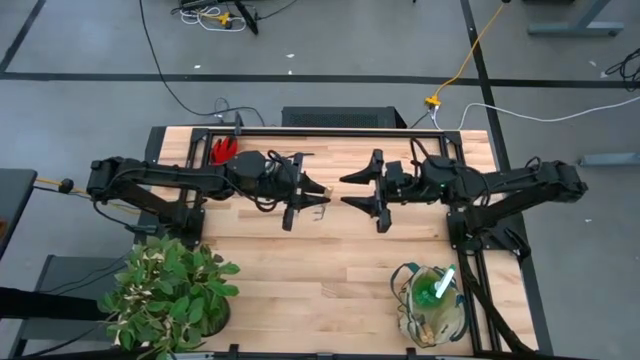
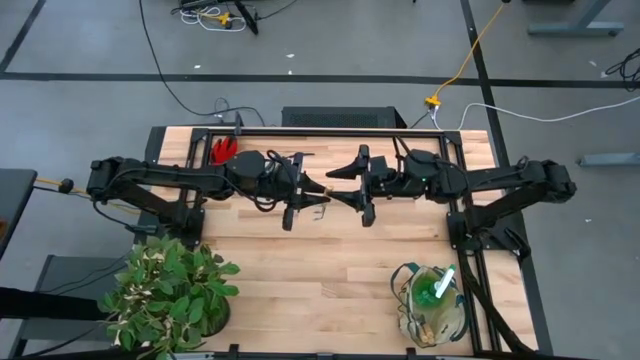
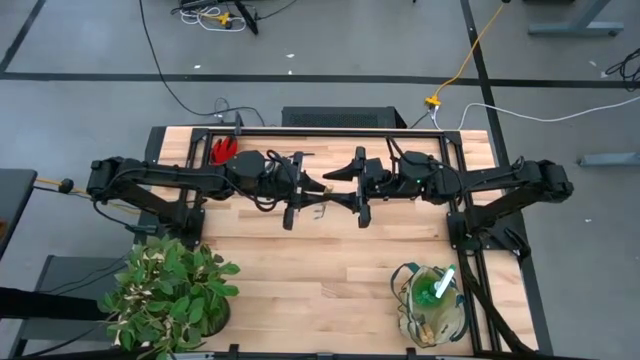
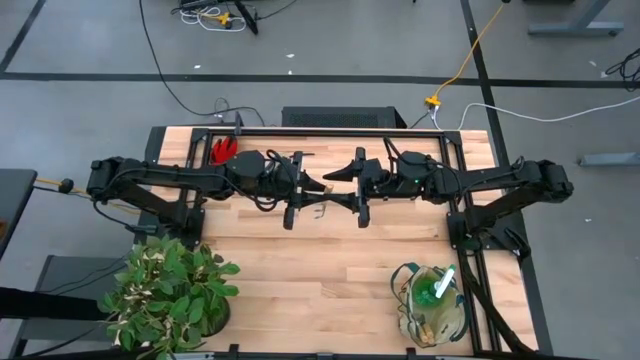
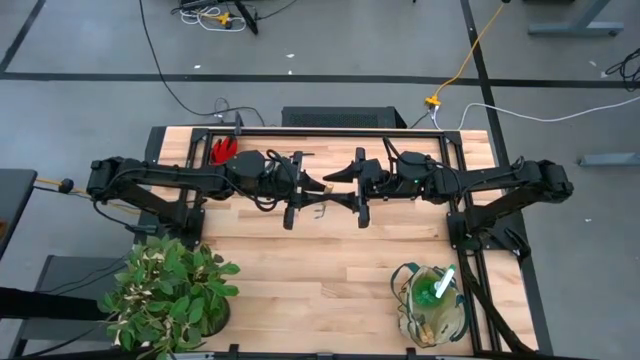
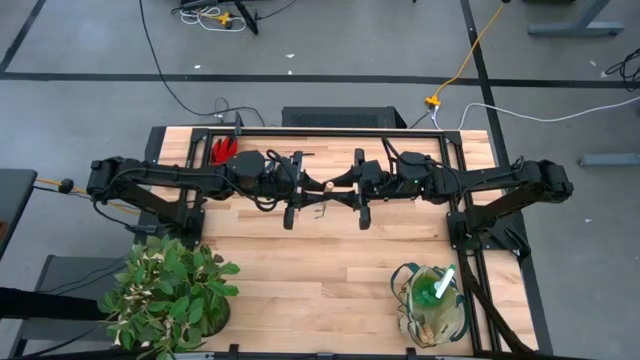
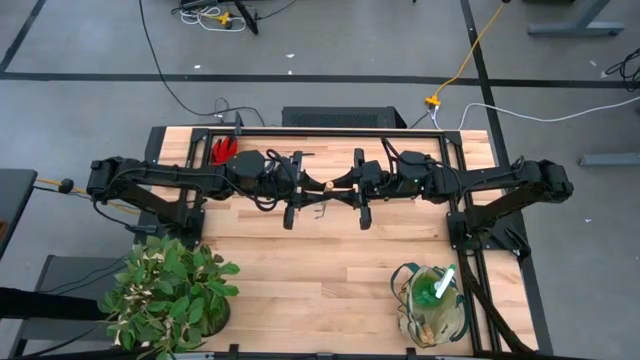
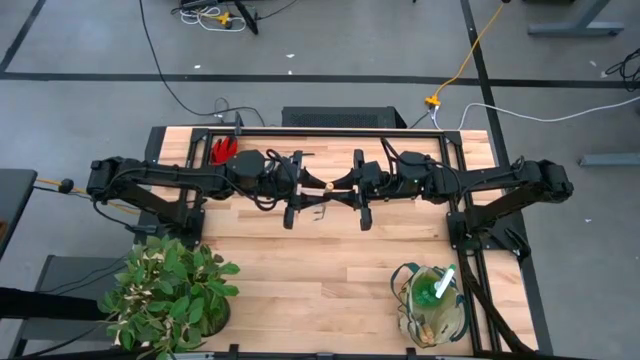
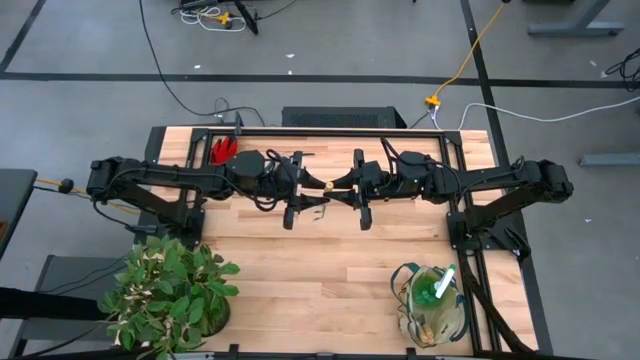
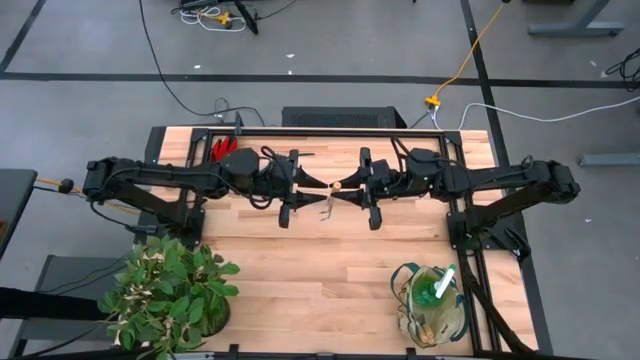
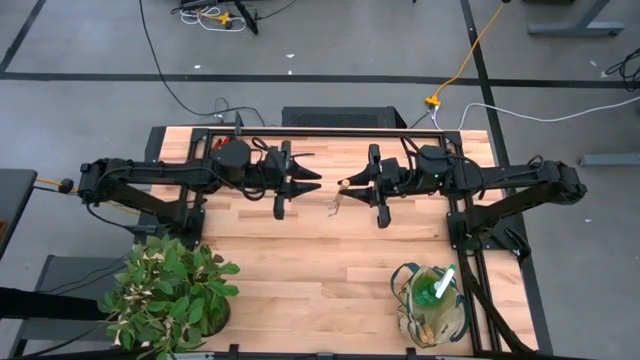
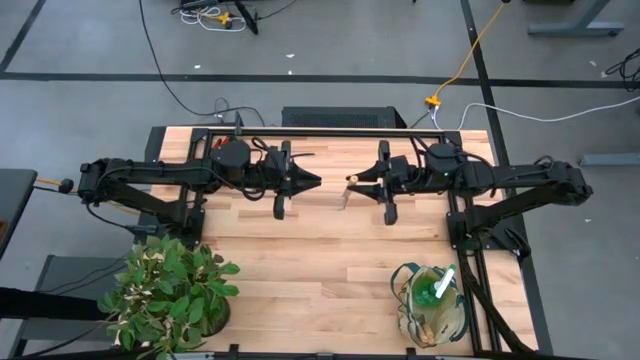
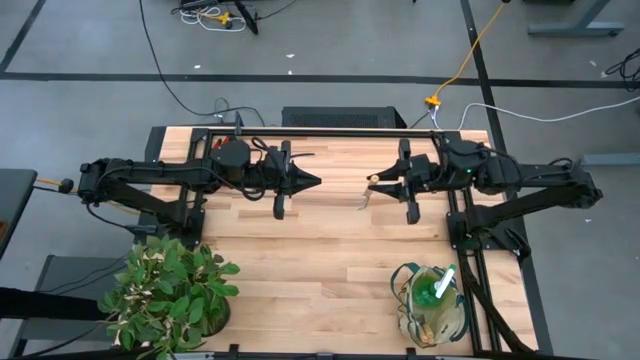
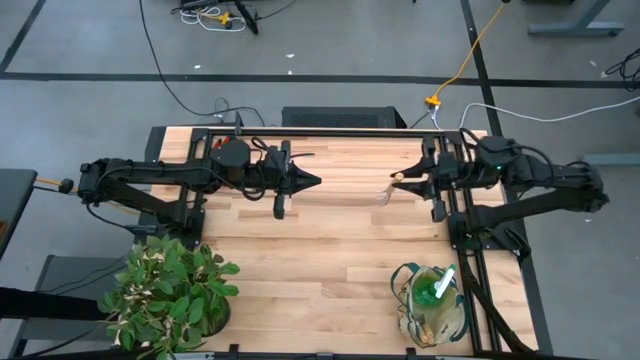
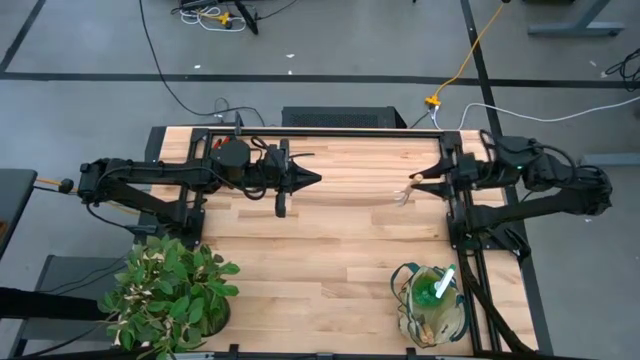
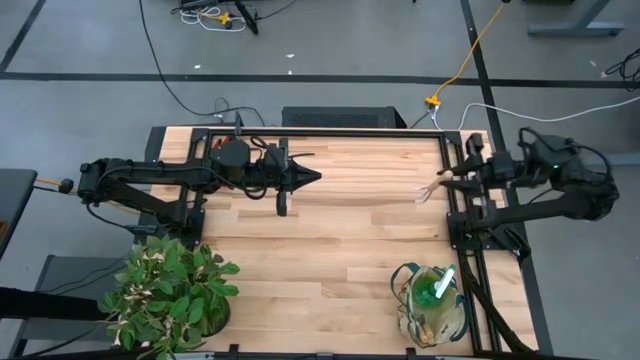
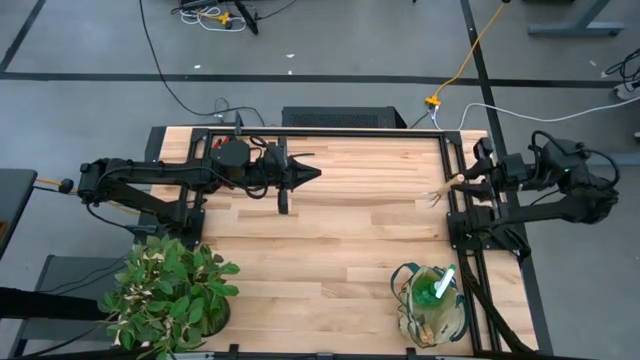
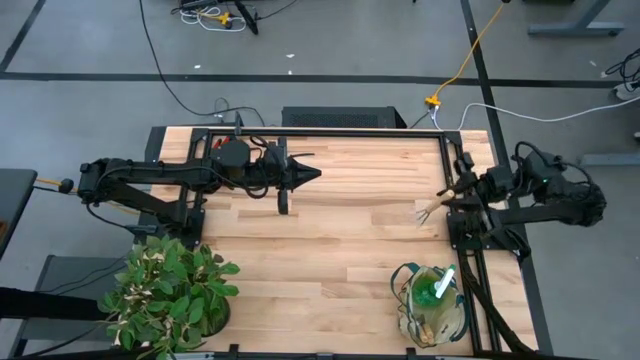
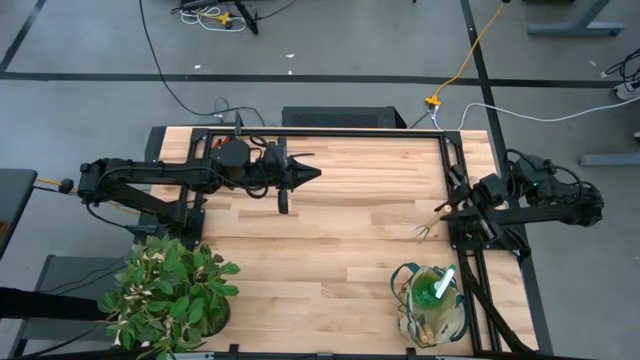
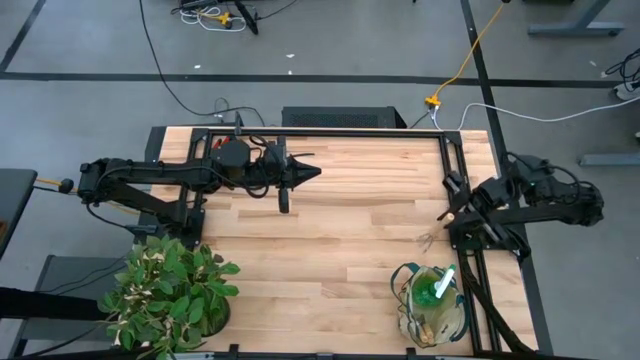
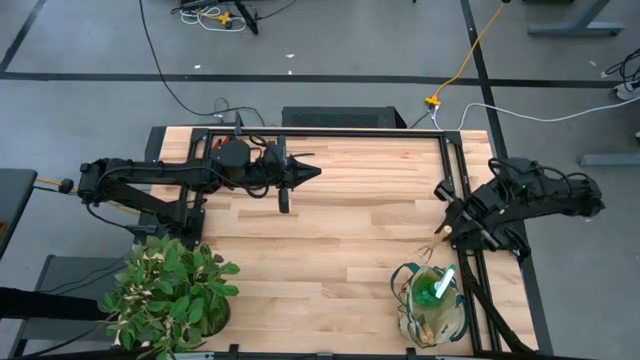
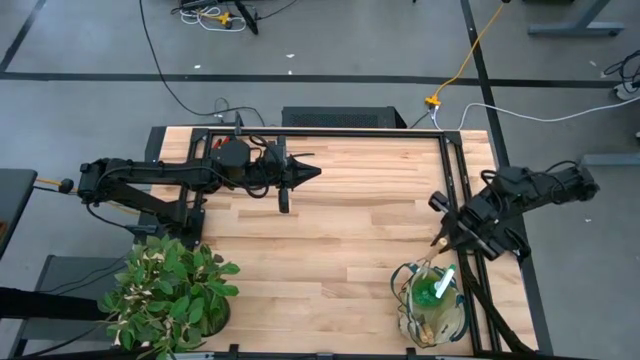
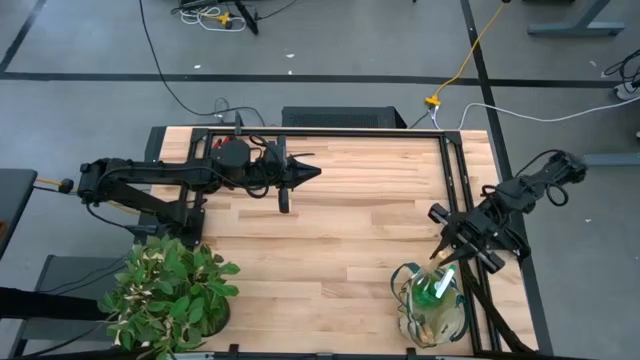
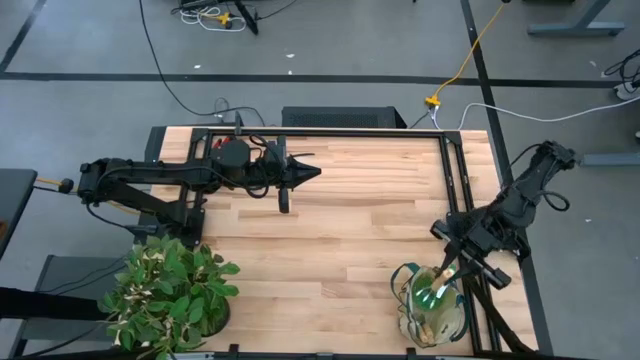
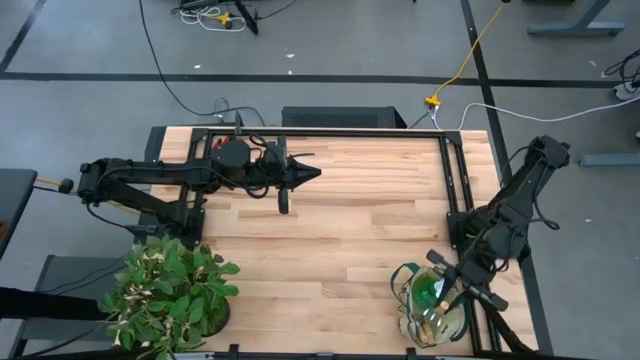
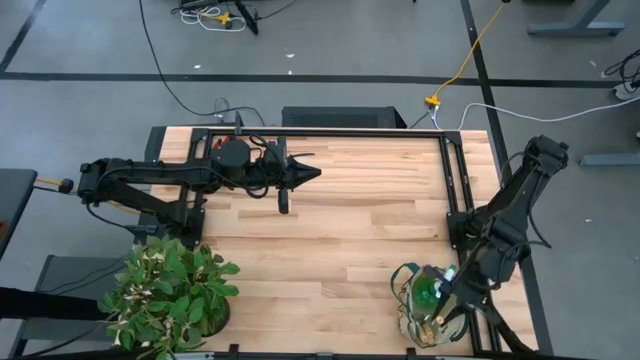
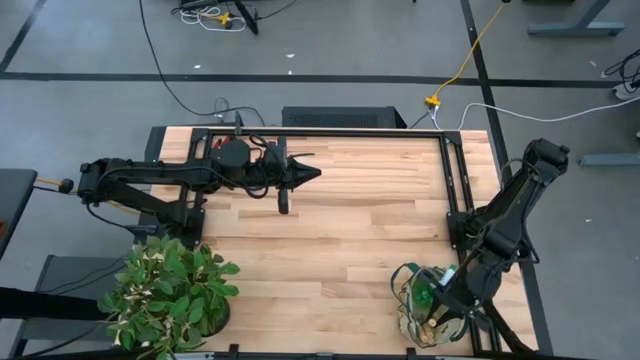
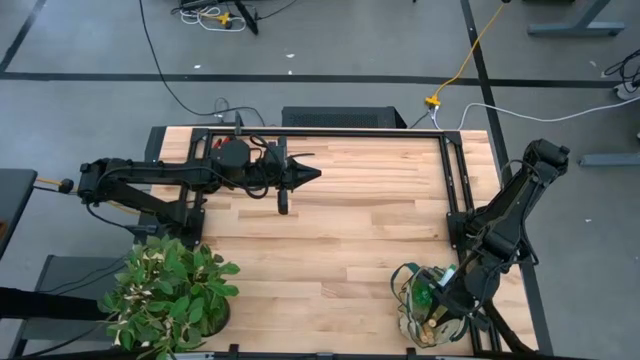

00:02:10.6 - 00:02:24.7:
Task: Pick & Place Garden tools in Gardening bag
Put the brown hand rake into the white gardening bag

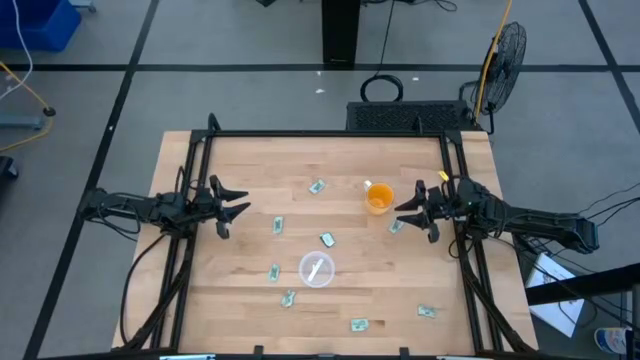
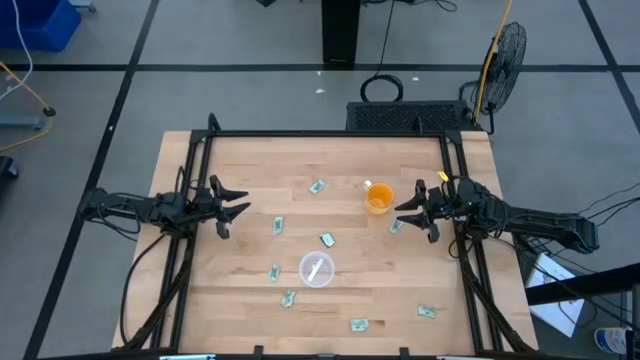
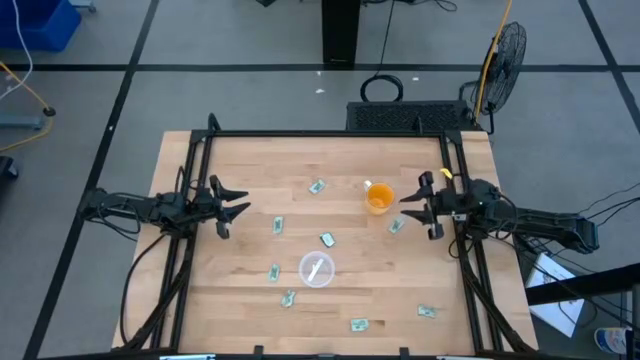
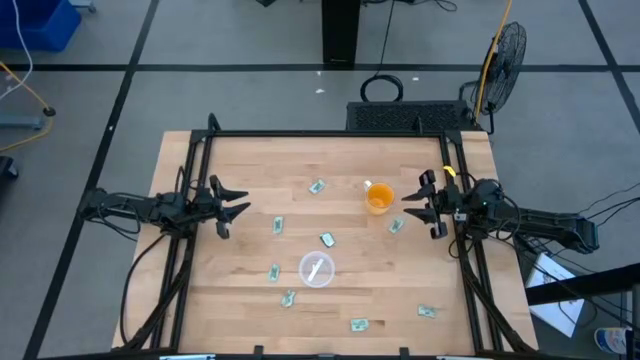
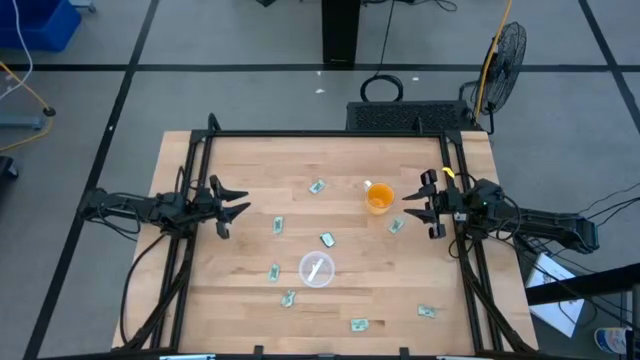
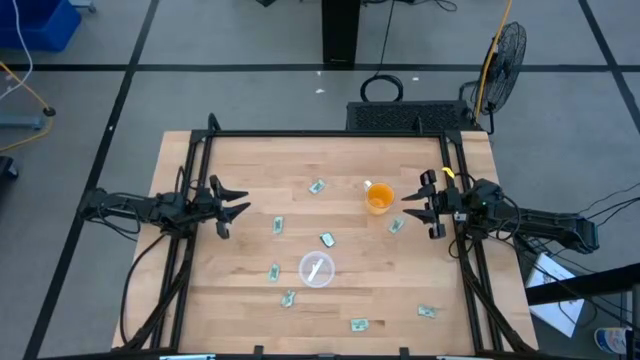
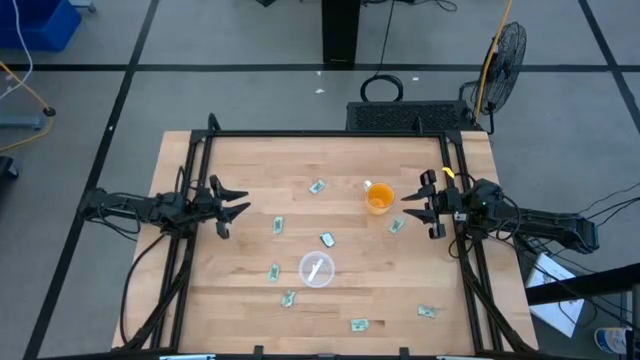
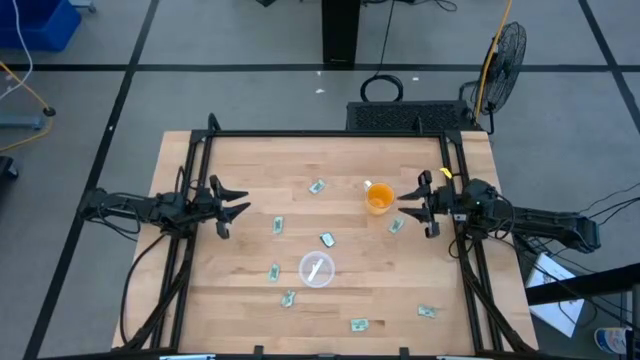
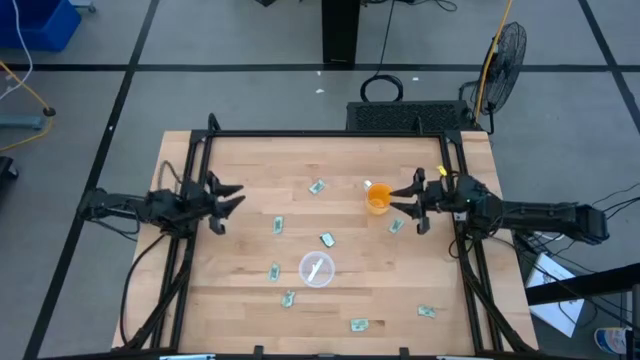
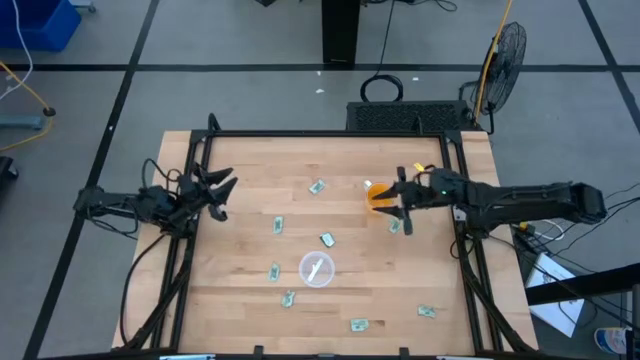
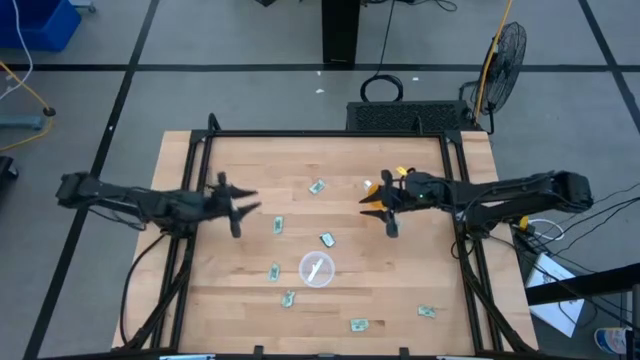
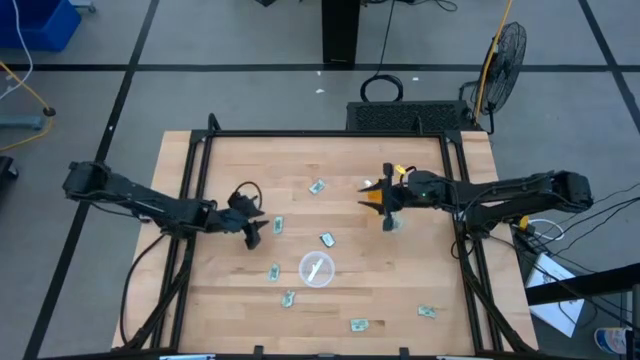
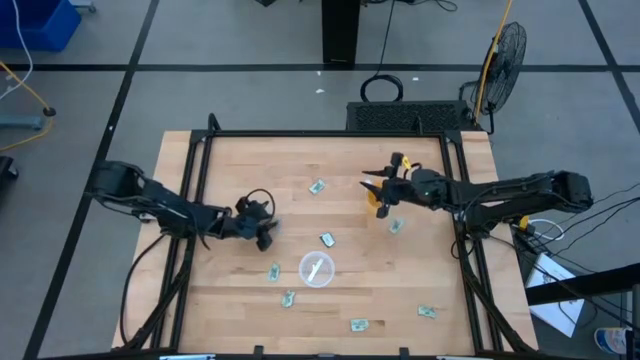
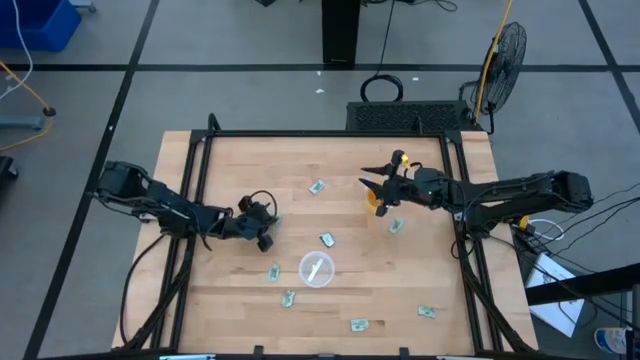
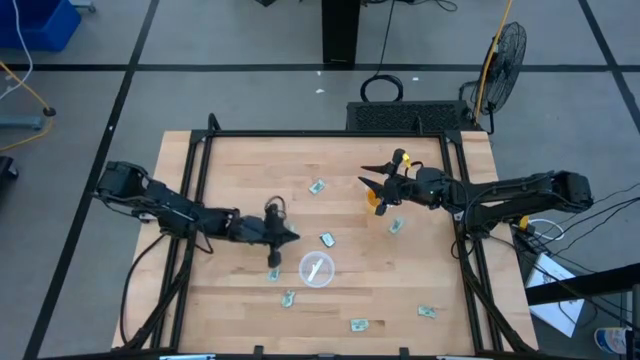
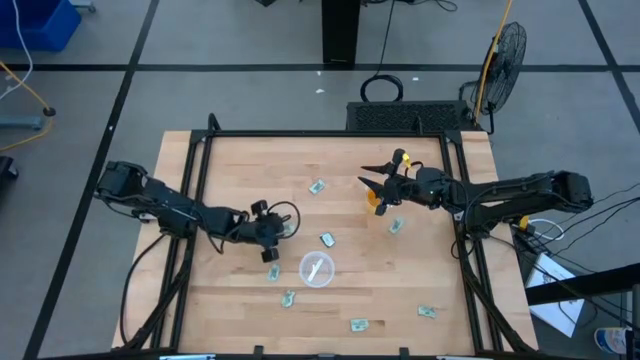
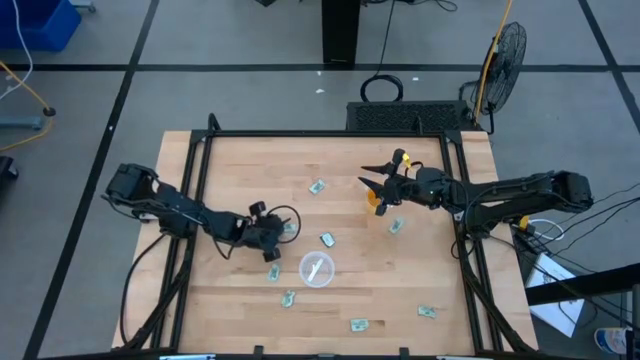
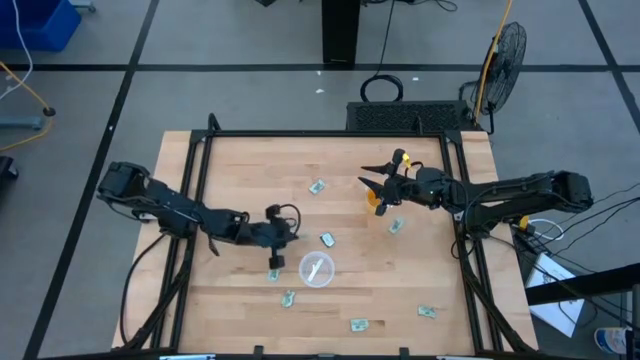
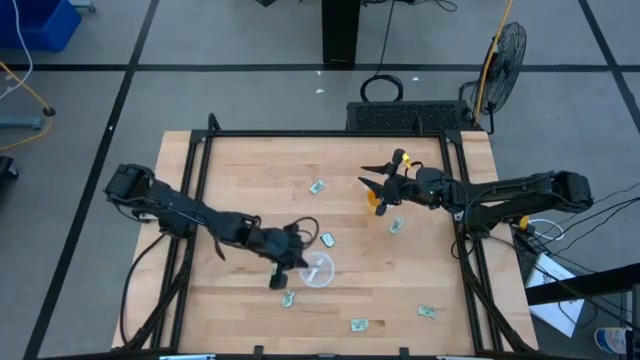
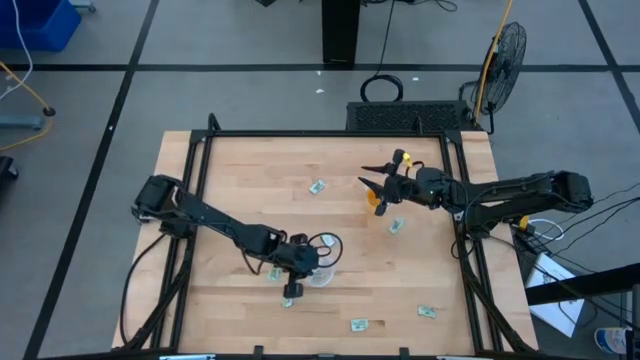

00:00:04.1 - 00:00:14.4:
Task: Pick and place items into bin
Put the white stevia packet into the transparent bin
